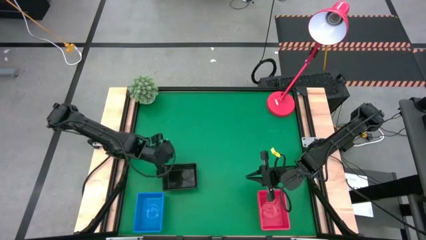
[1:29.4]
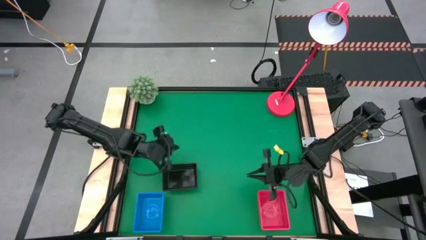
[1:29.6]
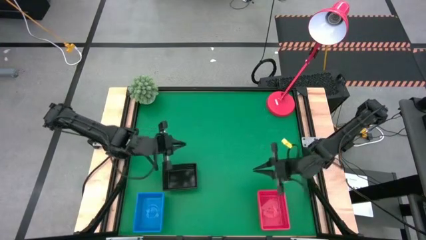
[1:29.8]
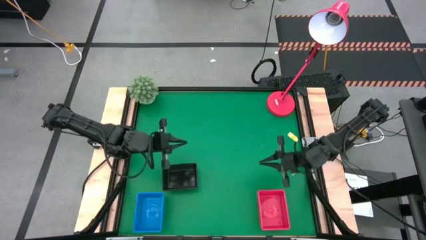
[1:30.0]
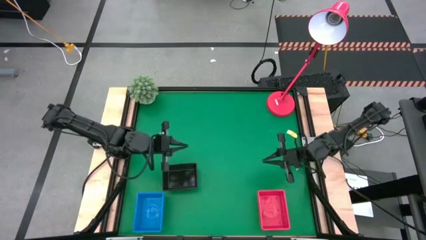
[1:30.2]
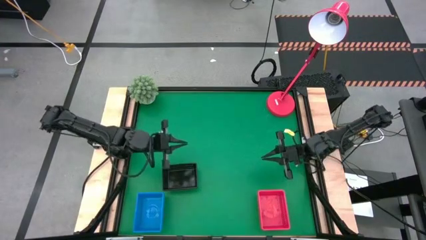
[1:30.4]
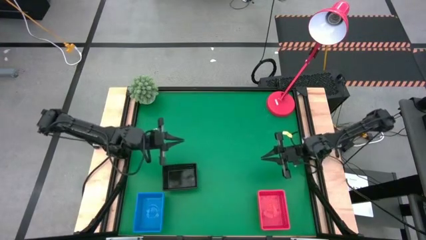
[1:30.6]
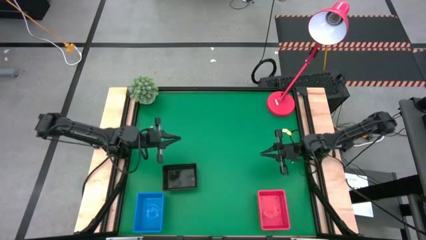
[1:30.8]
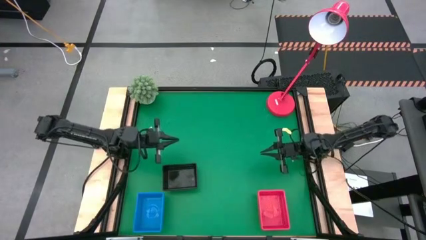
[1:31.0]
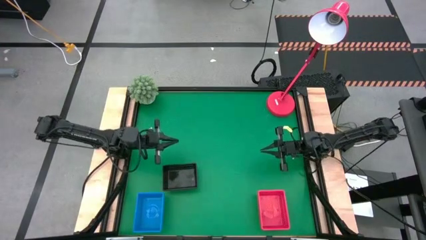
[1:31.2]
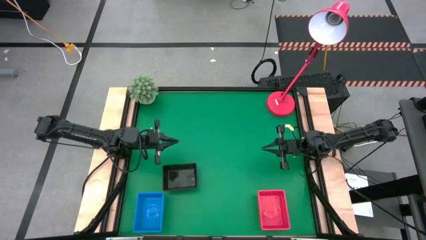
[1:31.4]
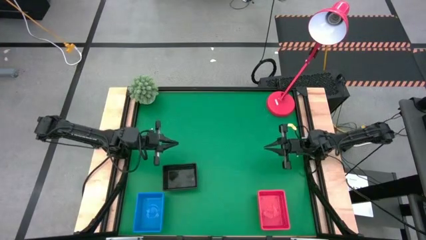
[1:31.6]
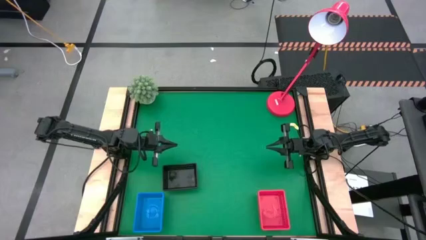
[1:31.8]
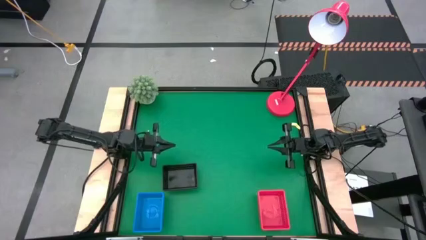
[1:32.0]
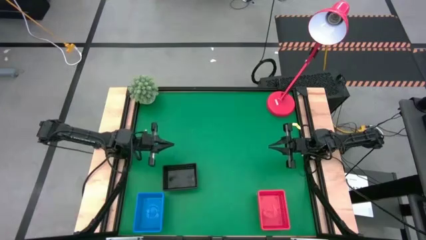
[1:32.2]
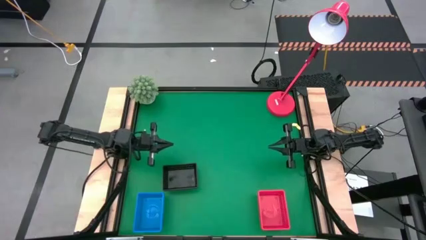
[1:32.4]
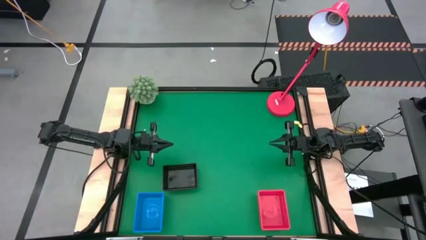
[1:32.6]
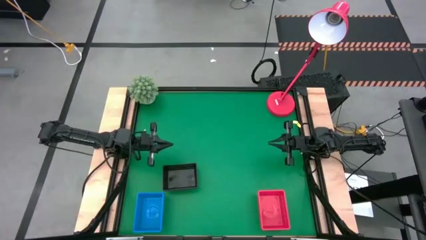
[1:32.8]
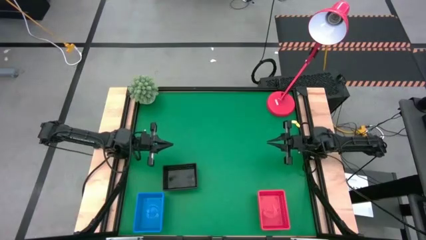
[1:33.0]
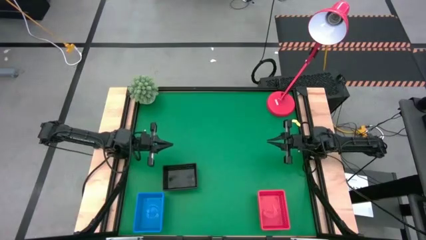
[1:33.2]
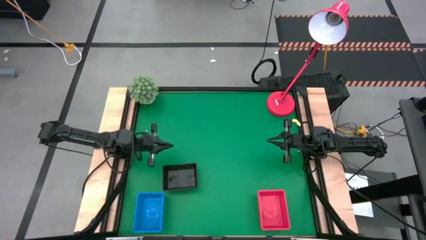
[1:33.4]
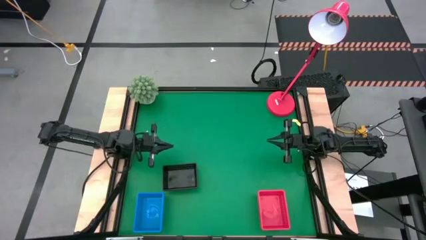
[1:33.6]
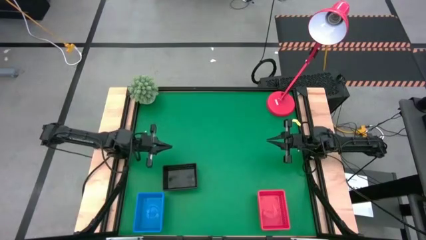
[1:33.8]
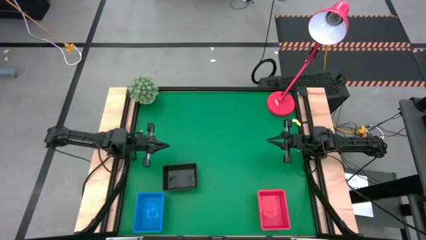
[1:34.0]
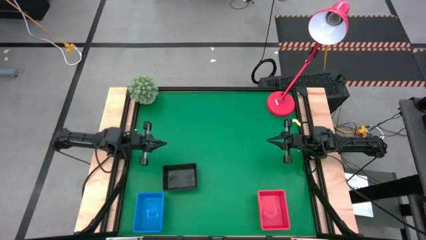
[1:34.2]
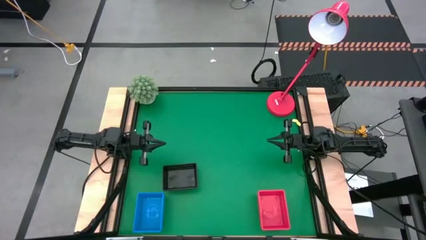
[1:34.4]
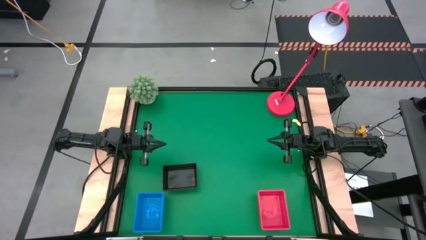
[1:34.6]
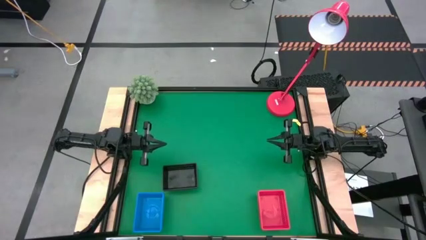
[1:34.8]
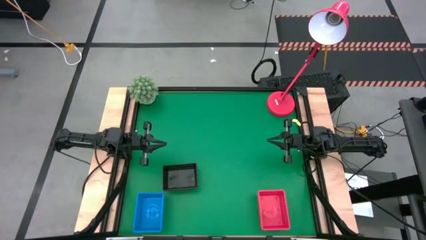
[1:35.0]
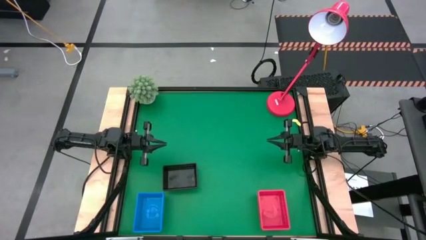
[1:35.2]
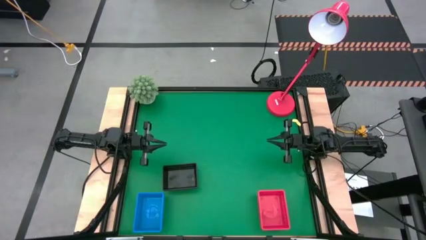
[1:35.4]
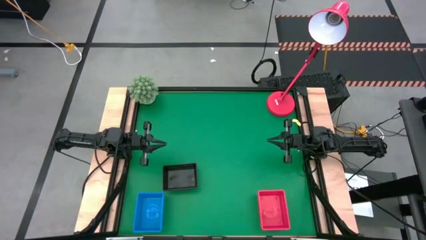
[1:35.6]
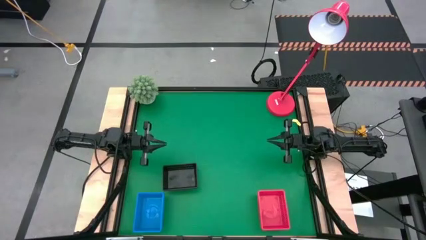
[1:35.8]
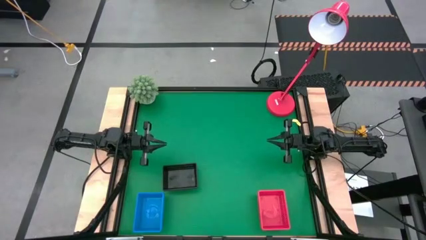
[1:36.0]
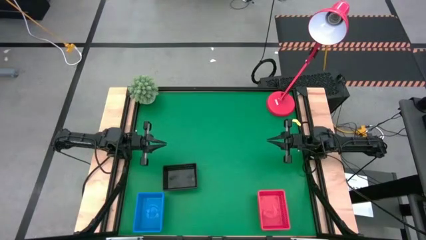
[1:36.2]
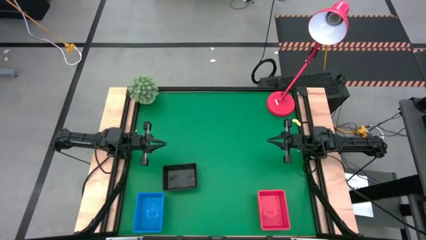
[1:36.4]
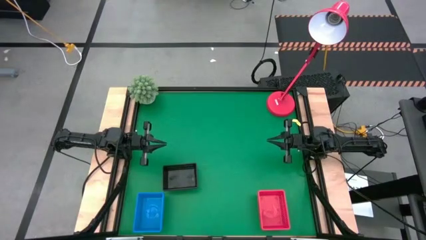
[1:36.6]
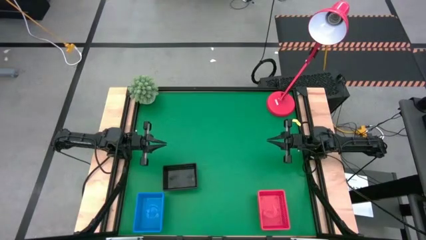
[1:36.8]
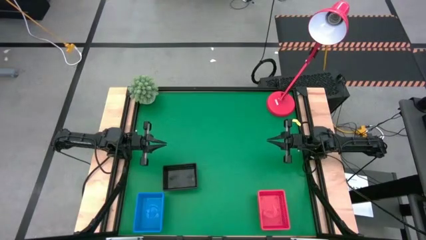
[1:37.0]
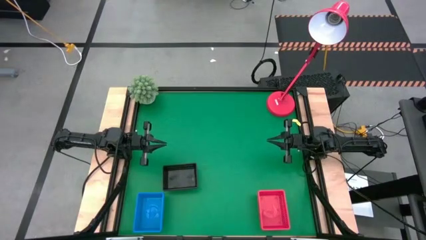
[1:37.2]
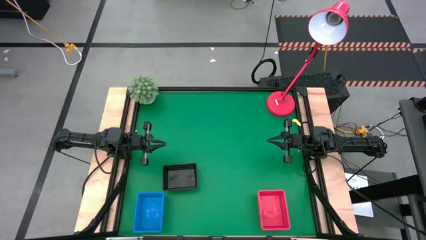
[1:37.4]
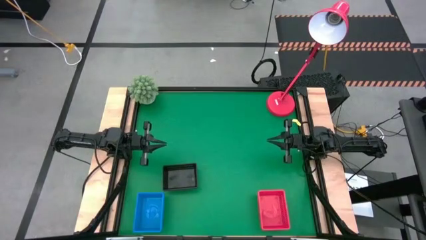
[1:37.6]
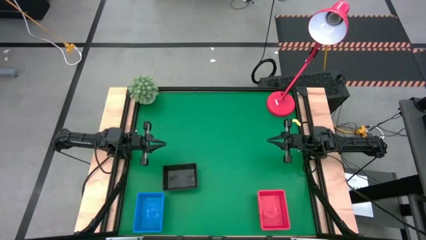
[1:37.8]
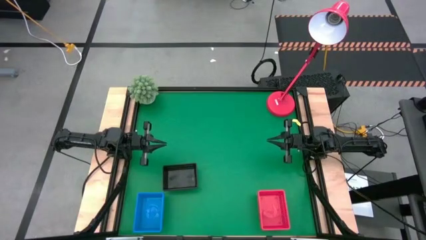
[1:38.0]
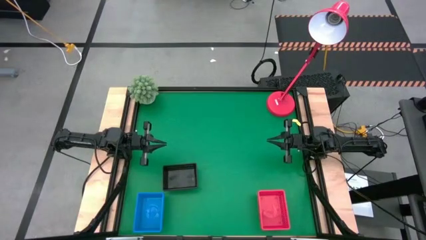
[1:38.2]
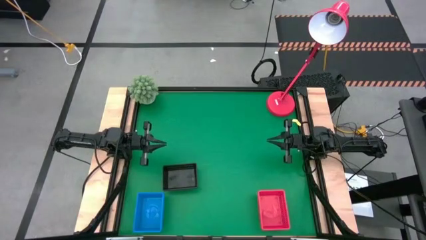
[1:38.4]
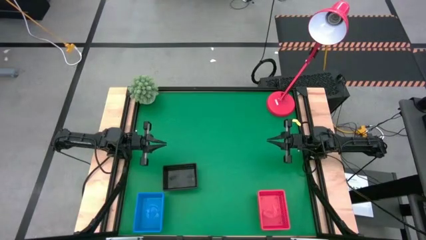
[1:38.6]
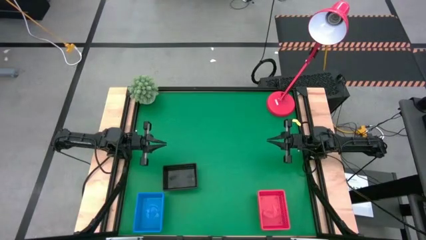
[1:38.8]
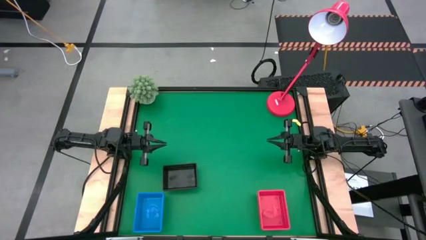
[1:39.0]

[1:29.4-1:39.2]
Return to Home Position
